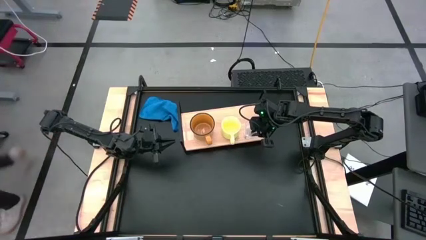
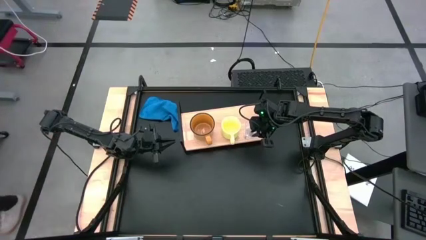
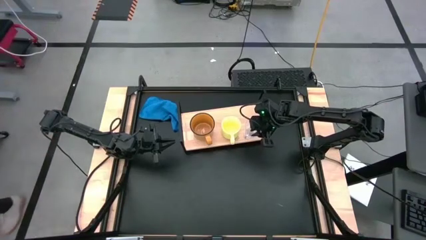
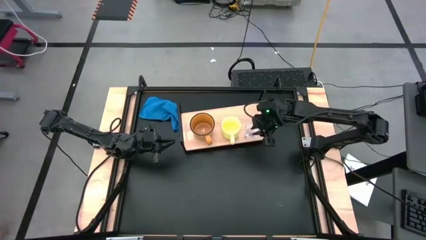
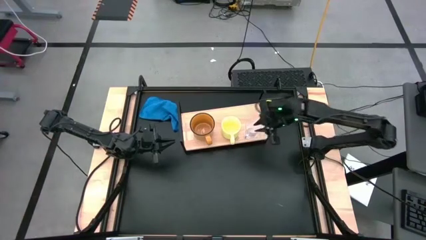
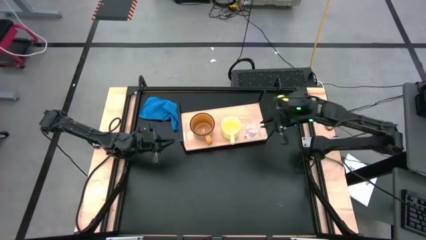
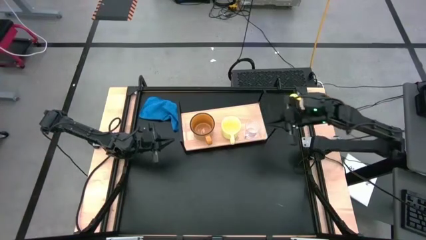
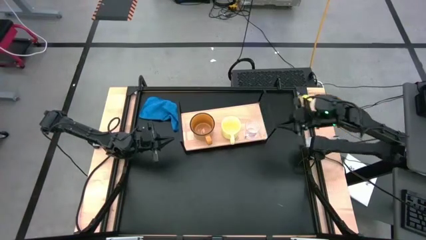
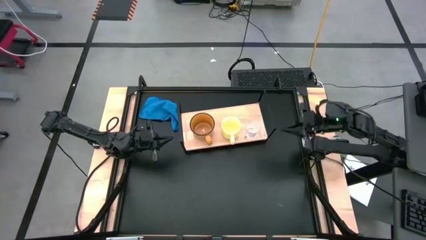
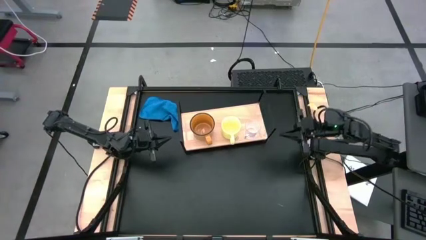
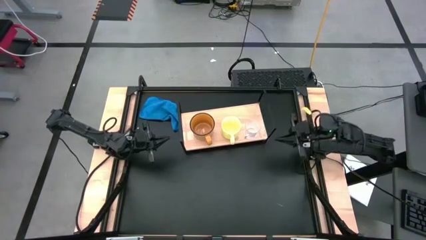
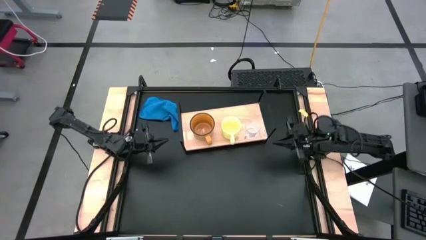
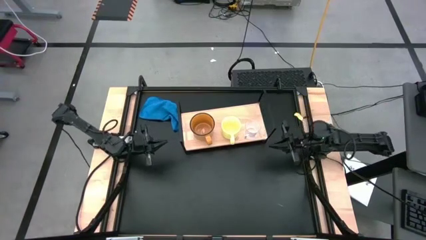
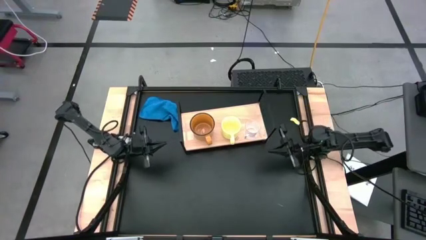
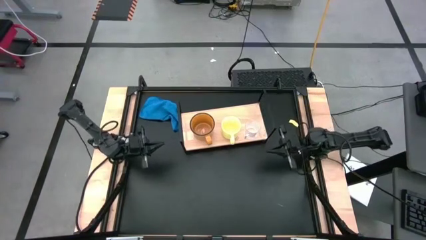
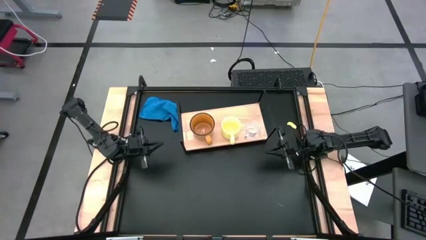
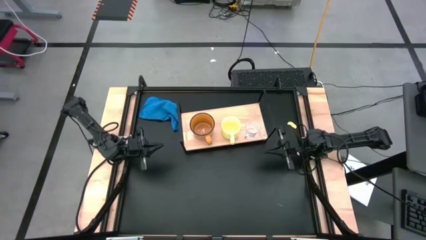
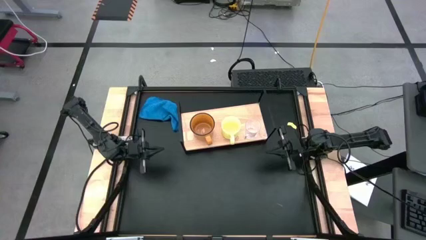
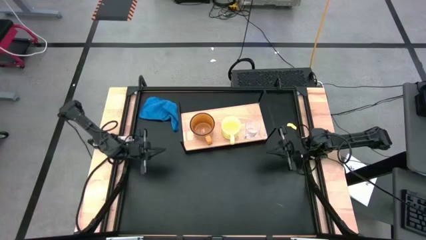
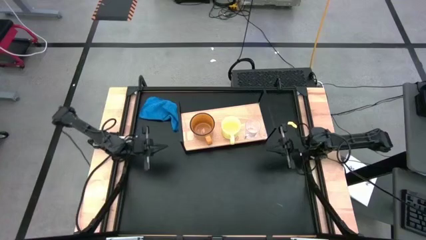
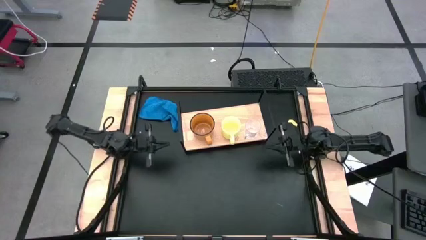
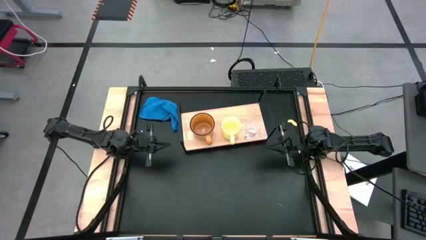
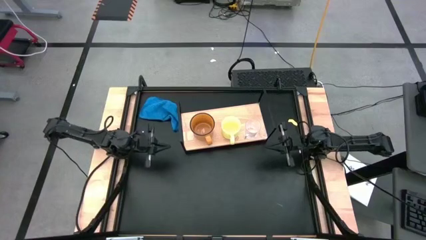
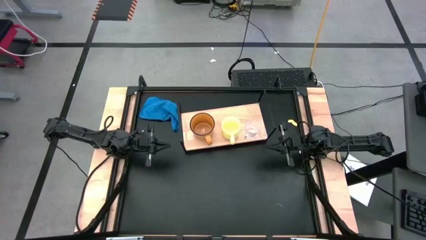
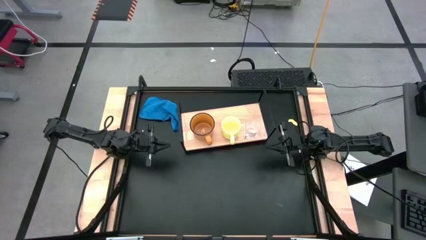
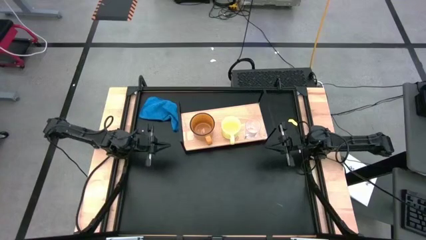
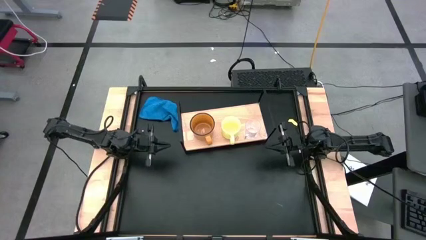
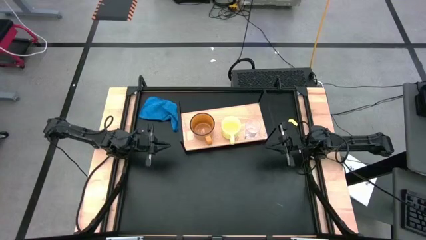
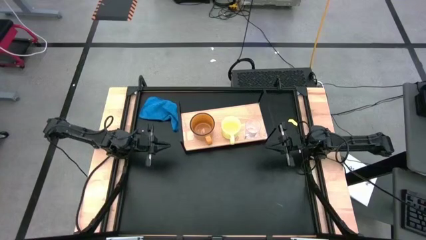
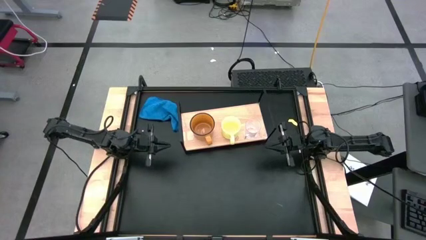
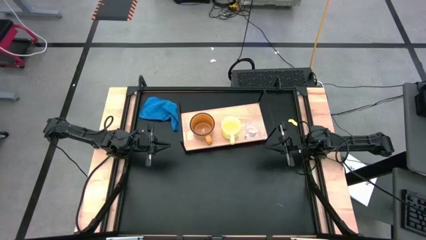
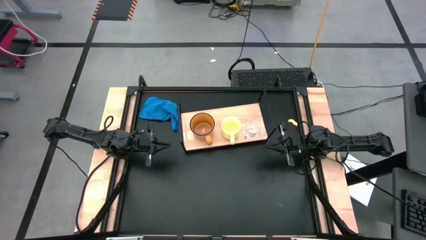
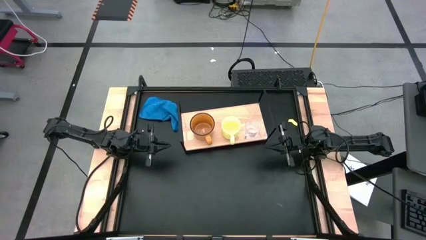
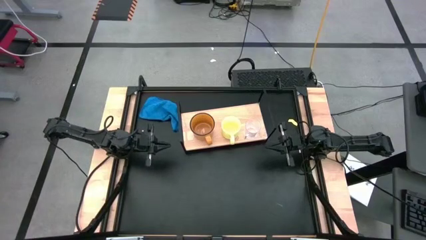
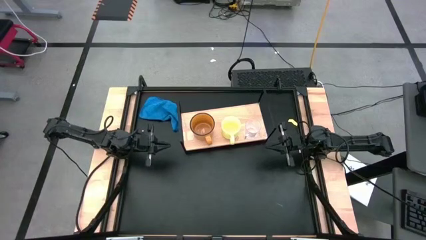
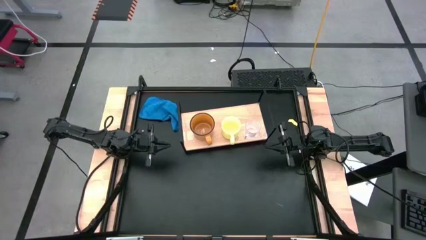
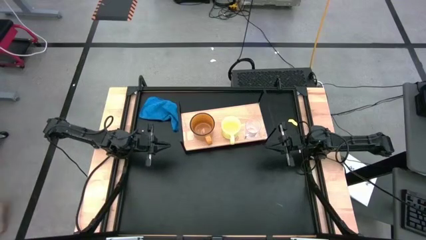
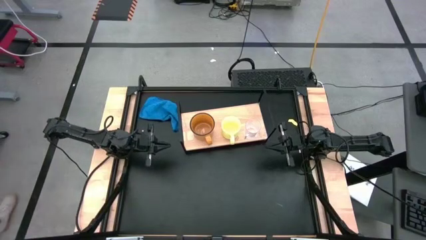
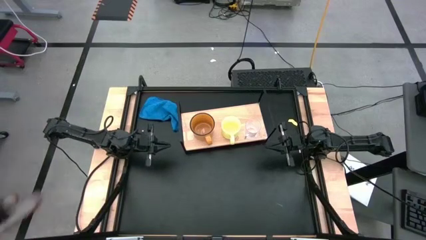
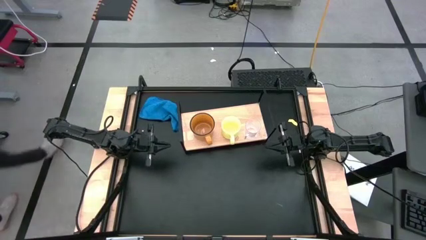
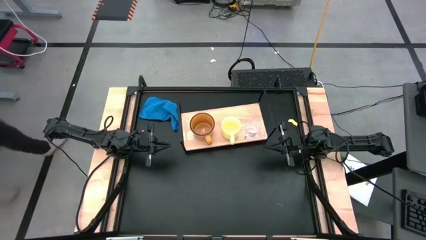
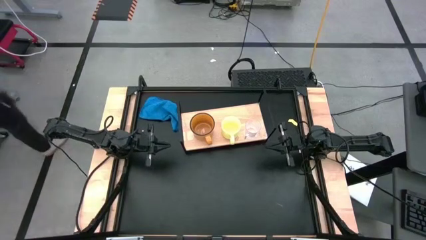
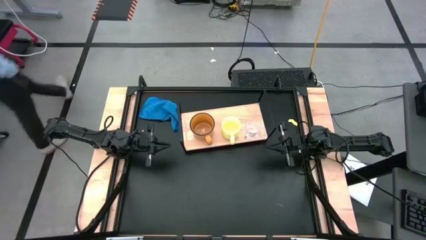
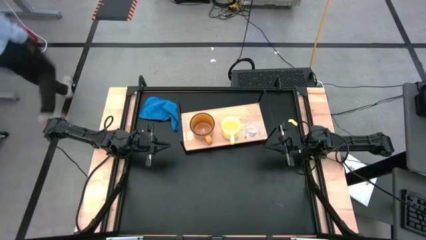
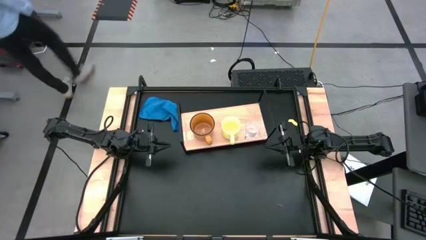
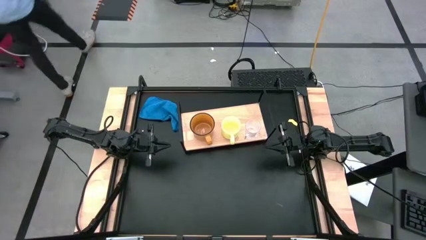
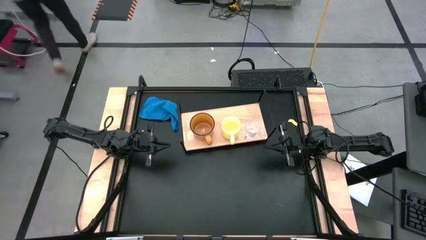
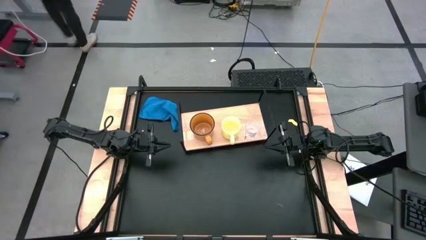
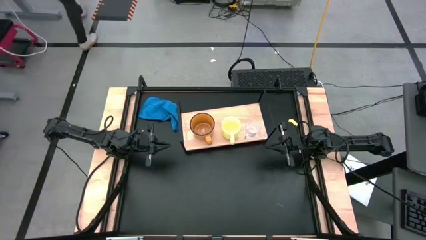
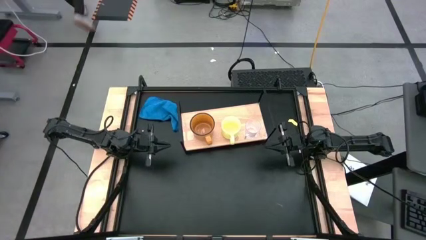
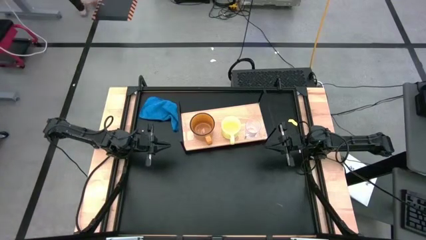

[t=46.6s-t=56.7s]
Task: Stack small to large cups/mugs on shelf
Return to Home Position
